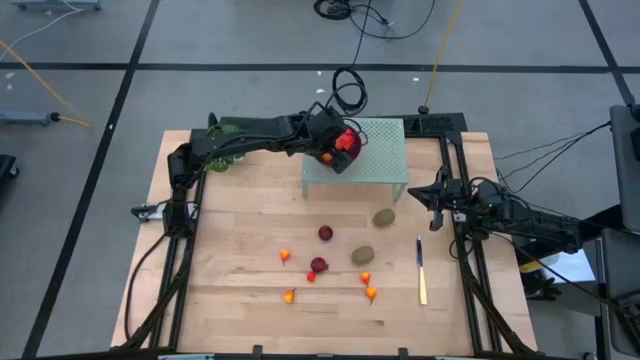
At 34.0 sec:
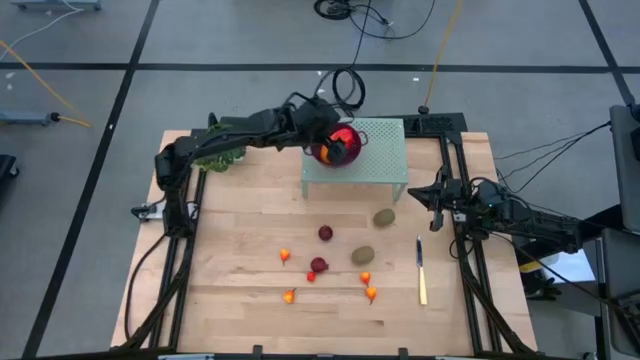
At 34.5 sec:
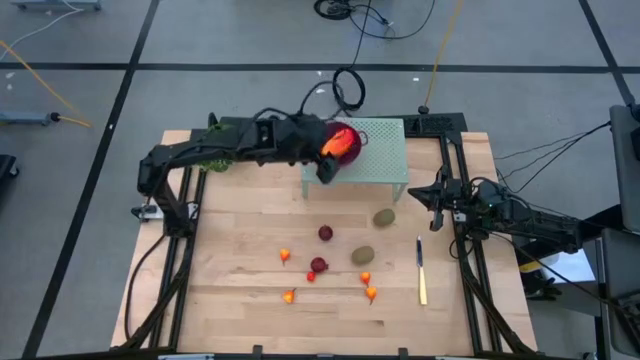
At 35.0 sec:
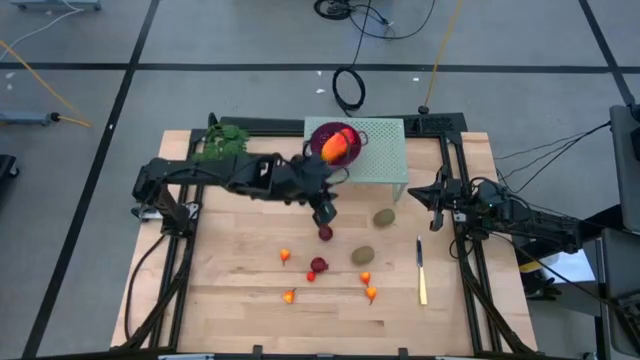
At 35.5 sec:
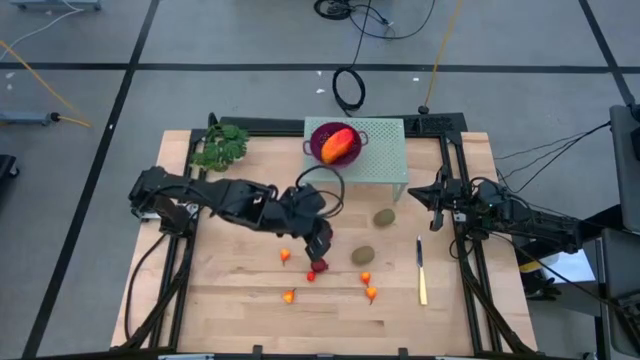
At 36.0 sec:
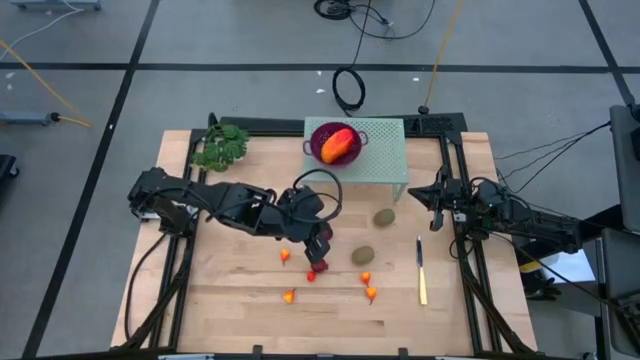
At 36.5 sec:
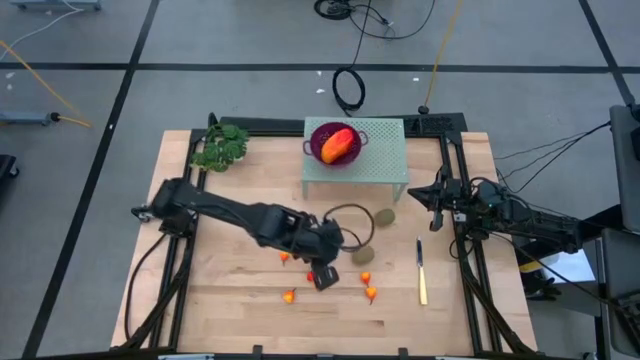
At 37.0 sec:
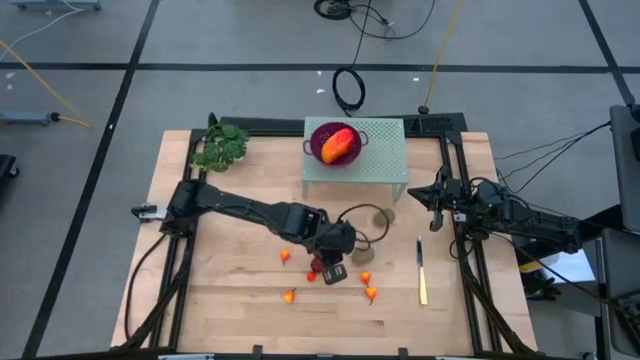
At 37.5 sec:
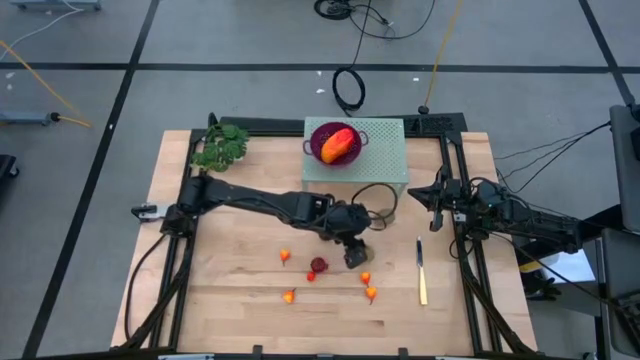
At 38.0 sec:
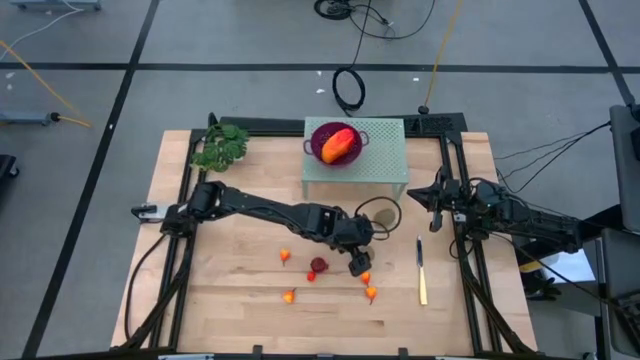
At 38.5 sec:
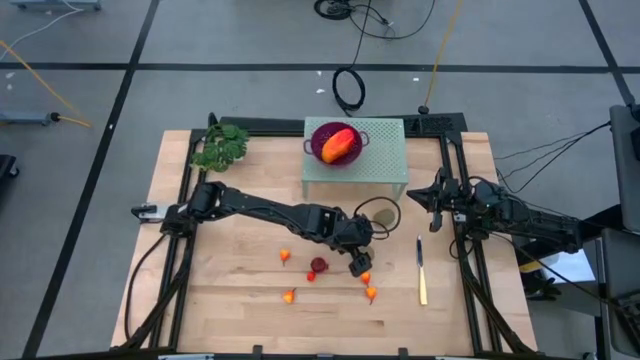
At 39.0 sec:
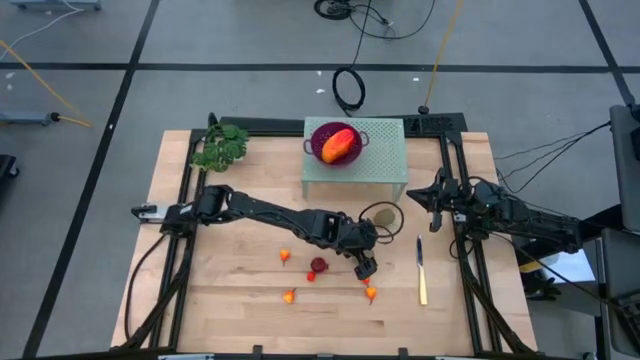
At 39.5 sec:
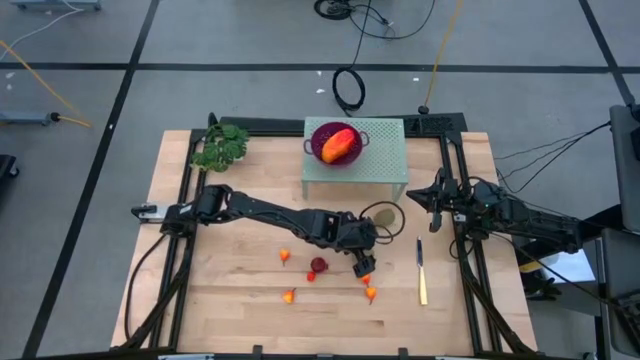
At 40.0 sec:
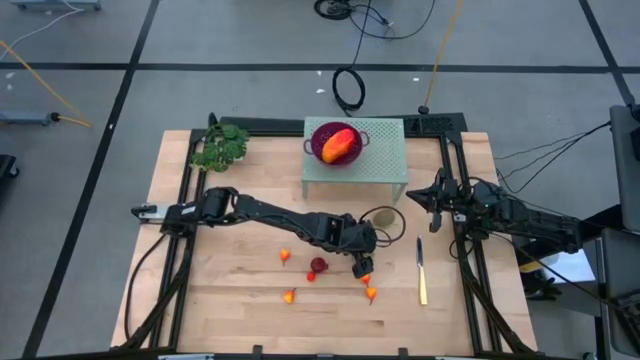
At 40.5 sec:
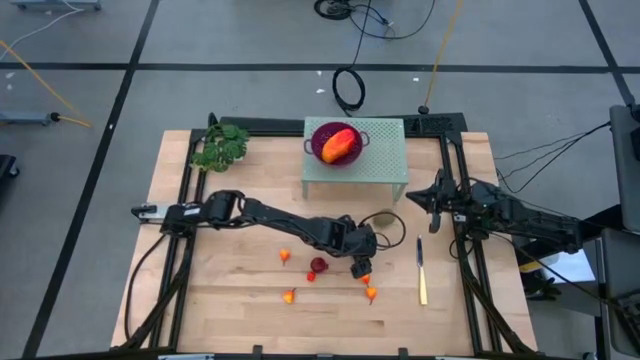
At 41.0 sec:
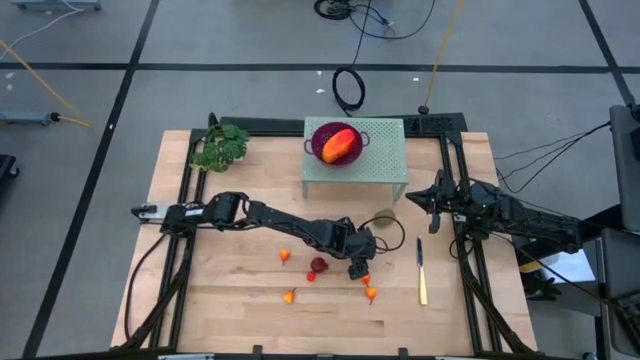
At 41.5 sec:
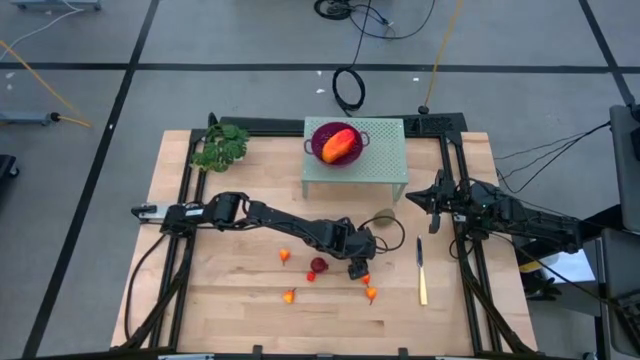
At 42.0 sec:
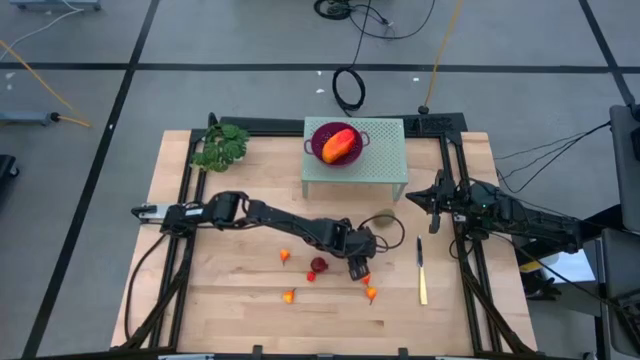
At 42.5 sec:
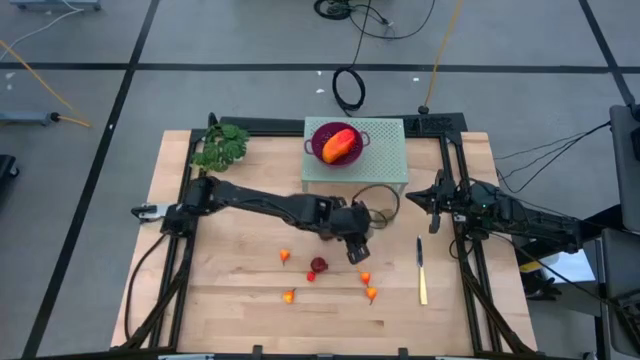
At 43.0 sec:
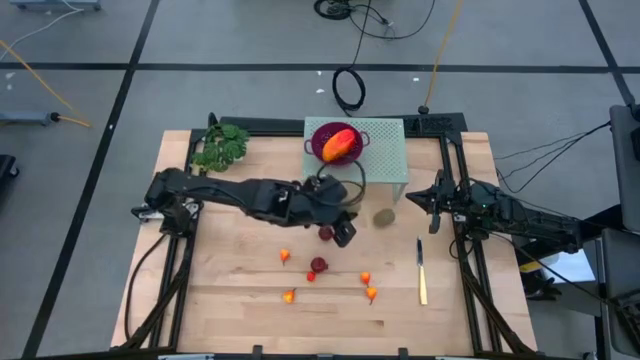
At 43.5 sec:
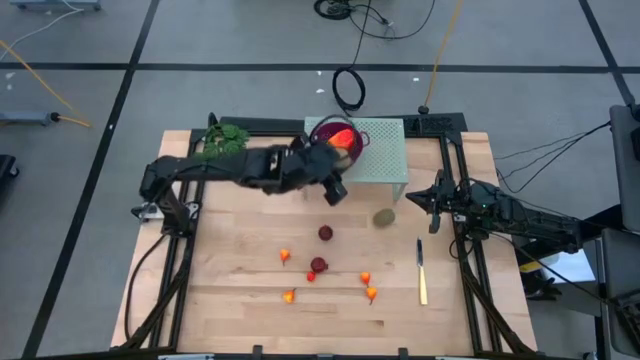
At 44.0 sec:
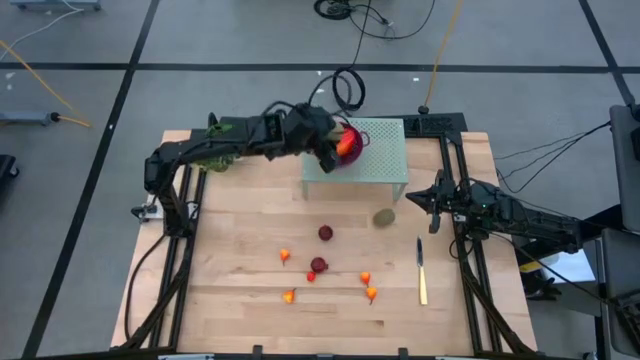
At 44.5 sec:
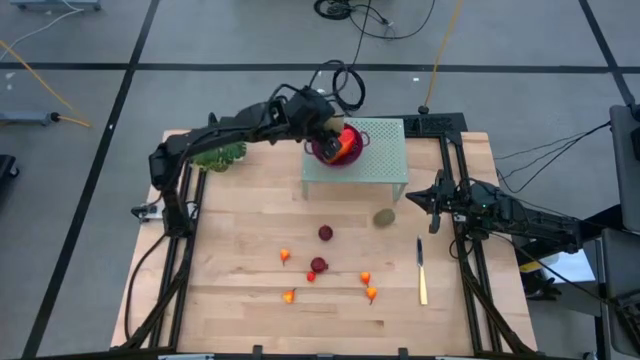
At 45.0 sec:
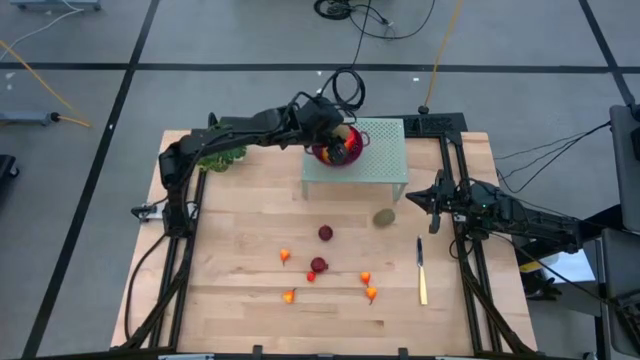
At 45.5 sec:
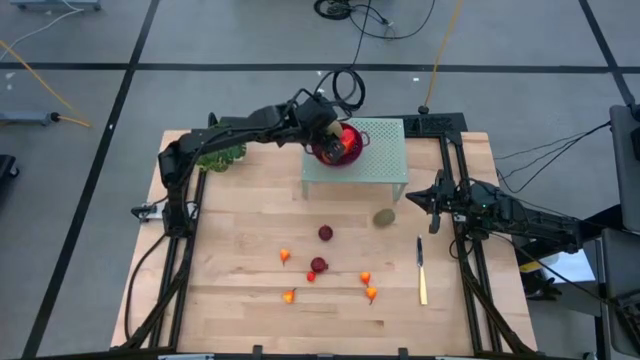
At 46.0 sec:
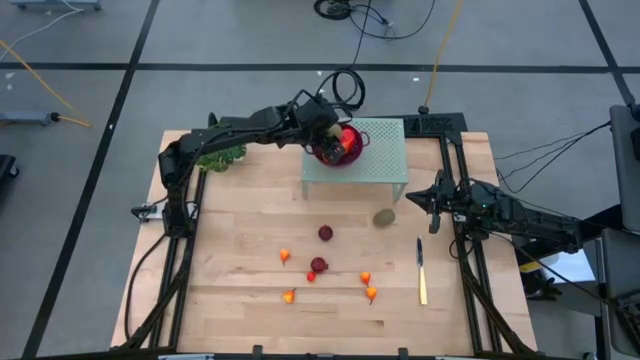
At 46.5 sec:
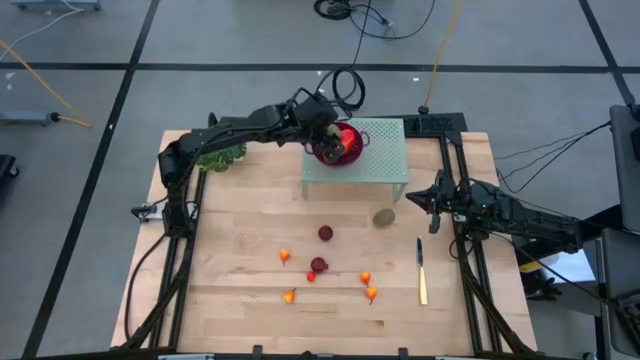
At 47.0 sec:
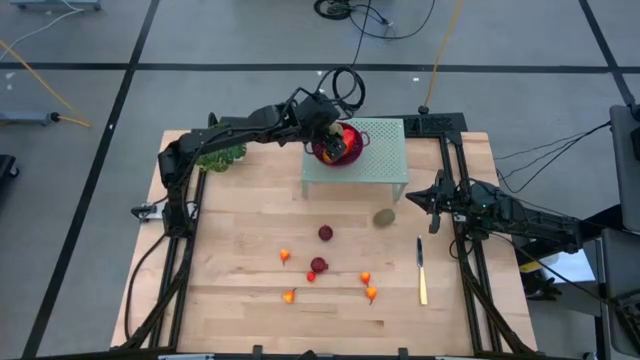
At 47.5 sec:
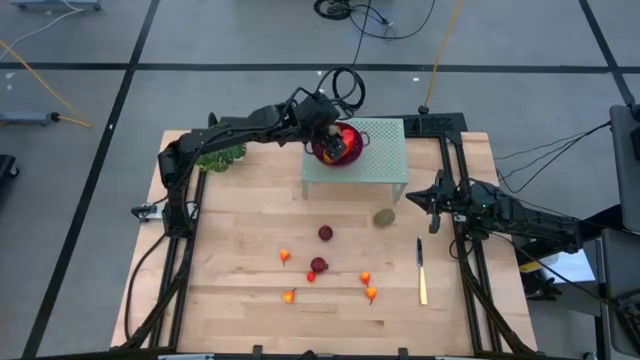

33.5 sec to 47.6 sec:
Task: Pick & Place Fruit
Put the bottom kiwi into the strainer bowl

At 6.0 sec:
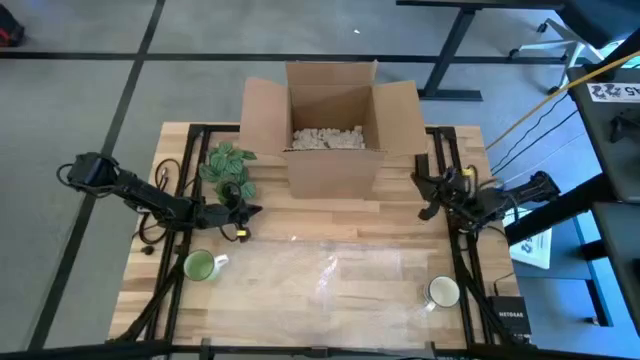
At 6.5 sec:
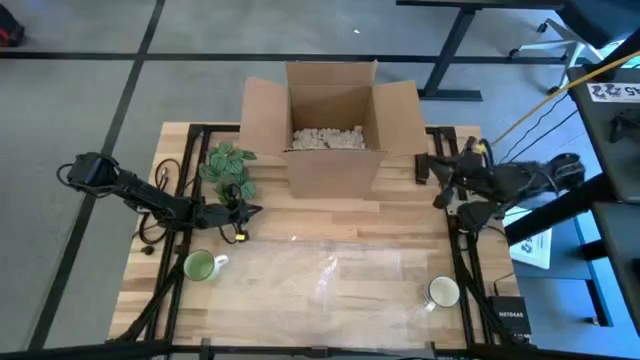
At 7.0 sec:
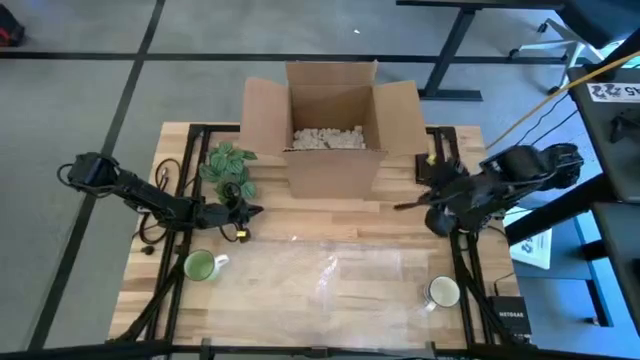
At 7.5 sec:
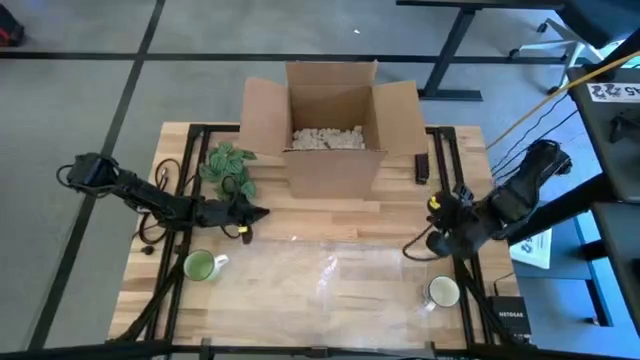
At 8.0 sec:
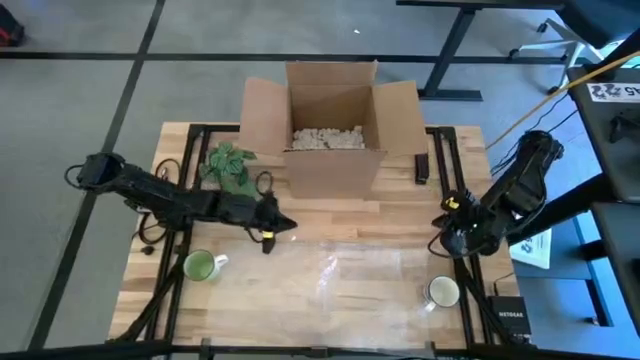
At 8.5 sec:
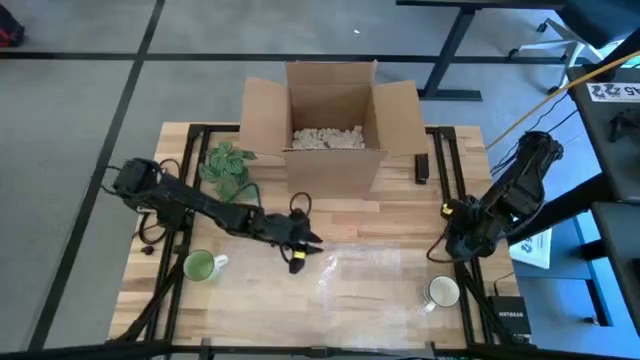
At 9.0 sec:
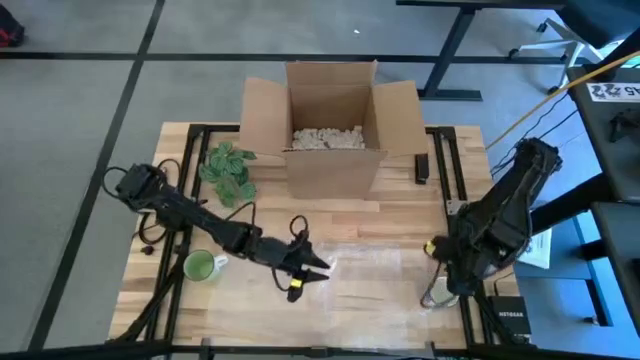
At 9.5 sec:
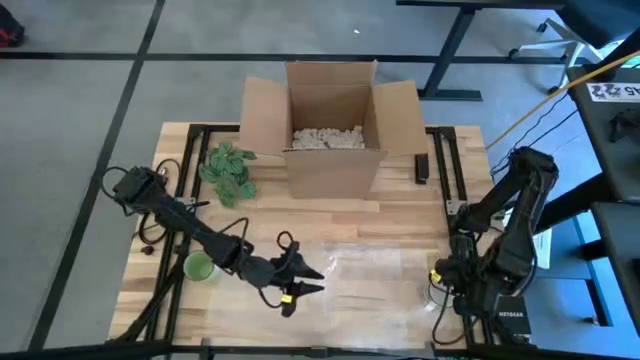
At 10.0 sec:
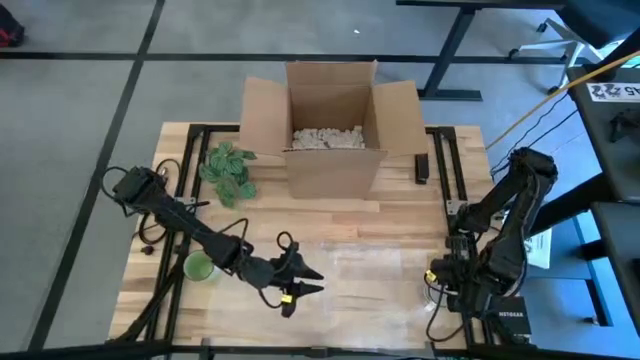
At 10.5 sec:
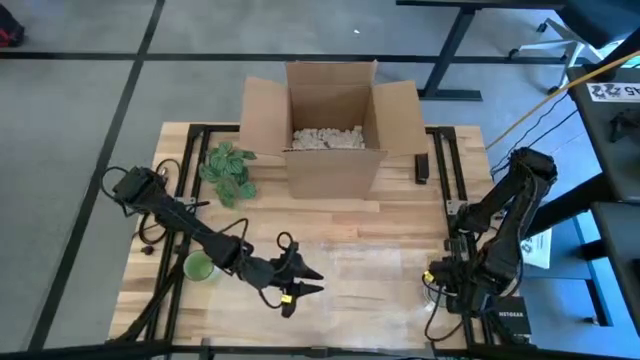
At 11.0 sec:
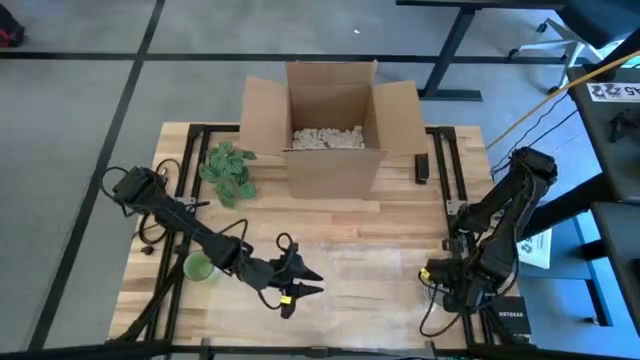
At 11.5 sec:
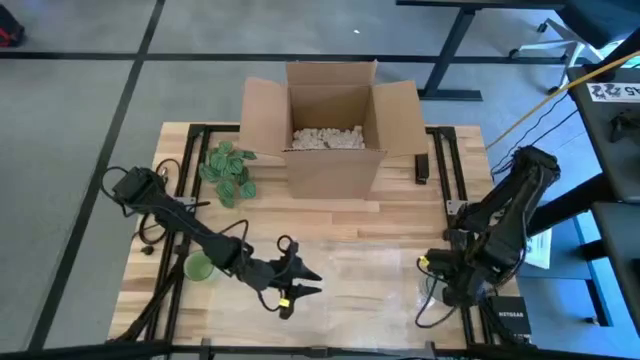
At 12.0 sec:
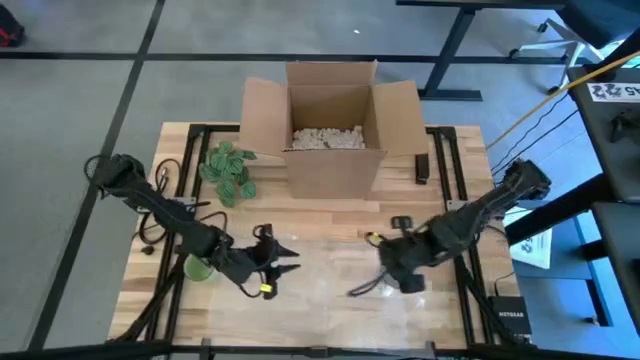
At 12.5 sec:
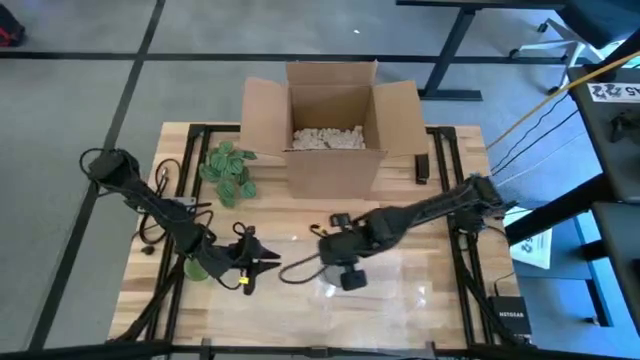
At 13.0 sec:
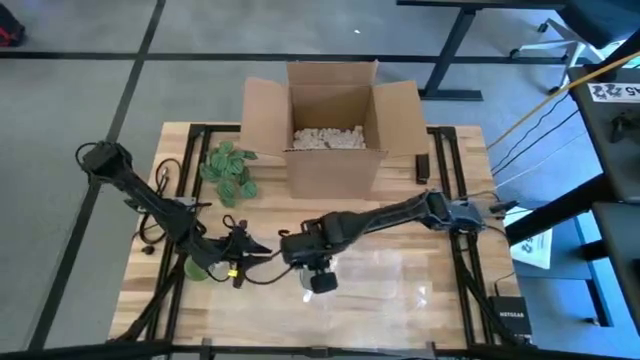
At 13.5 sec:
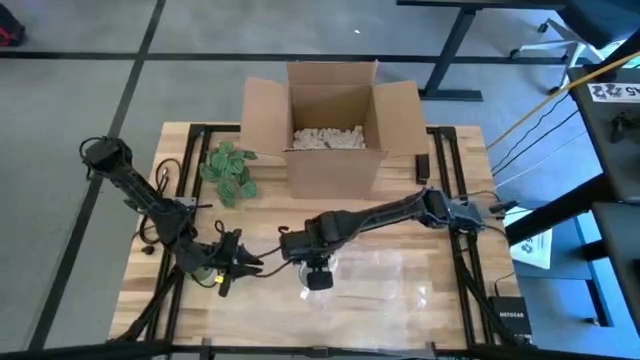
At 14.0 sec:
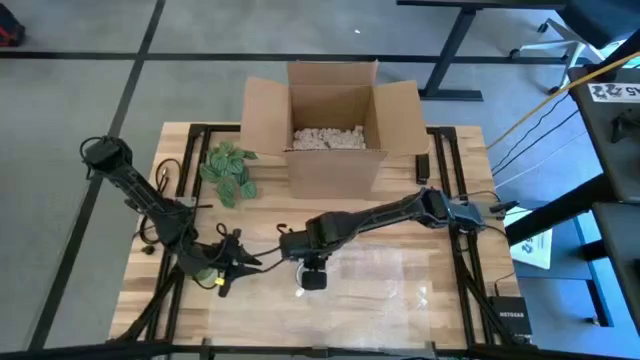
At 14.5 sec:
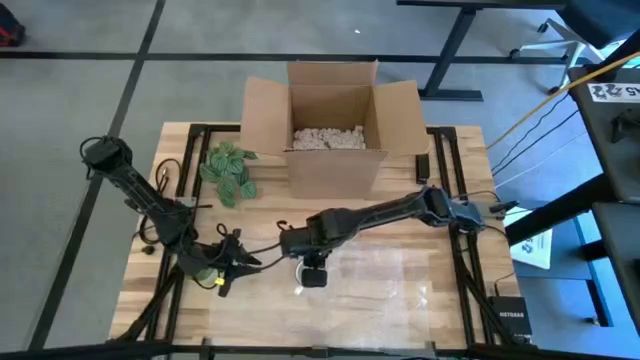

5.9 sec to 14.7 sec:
Task: wrap mug
Put the blue mug on the bubble wrap
